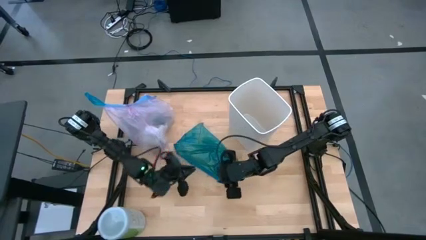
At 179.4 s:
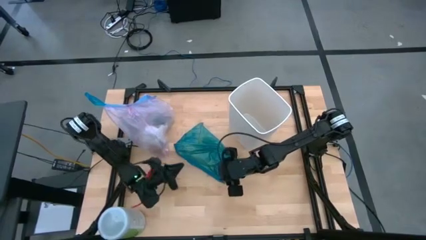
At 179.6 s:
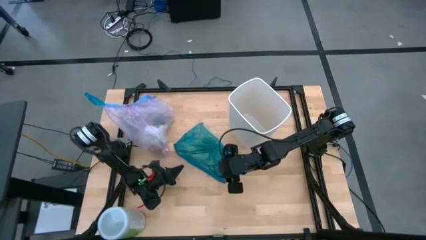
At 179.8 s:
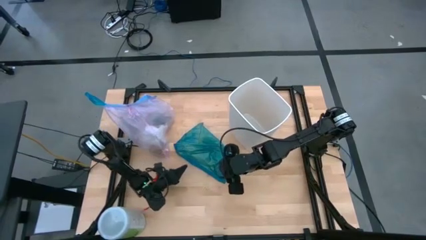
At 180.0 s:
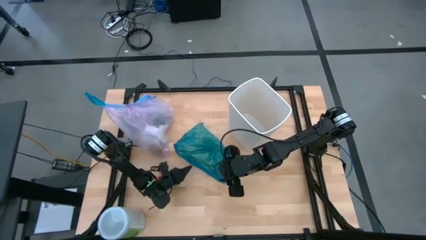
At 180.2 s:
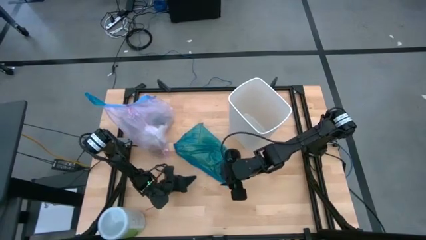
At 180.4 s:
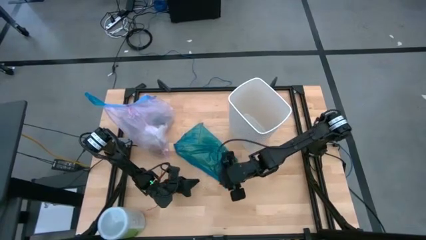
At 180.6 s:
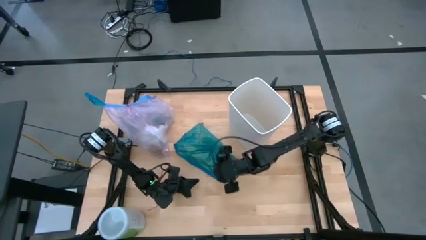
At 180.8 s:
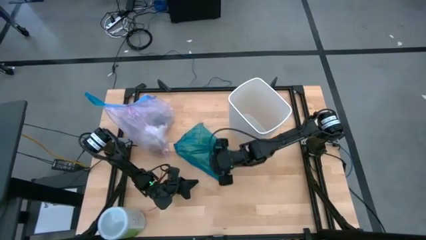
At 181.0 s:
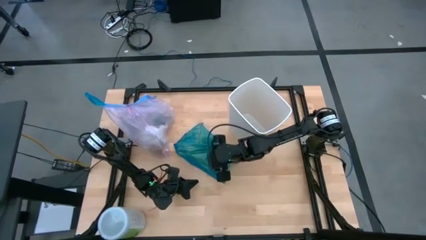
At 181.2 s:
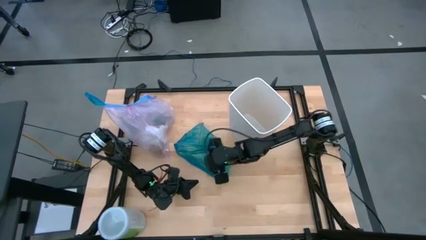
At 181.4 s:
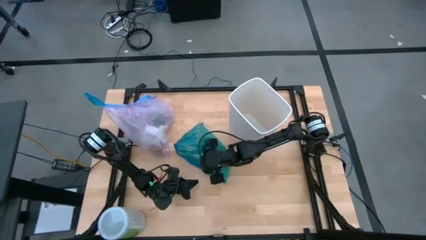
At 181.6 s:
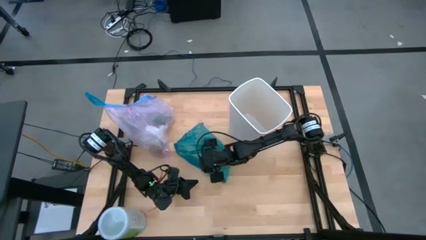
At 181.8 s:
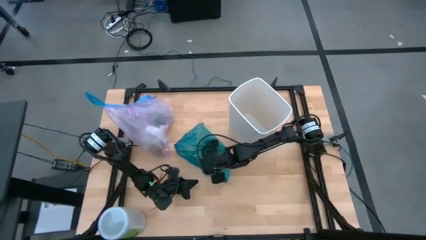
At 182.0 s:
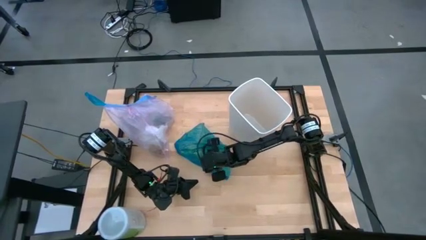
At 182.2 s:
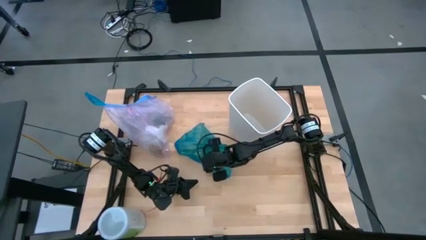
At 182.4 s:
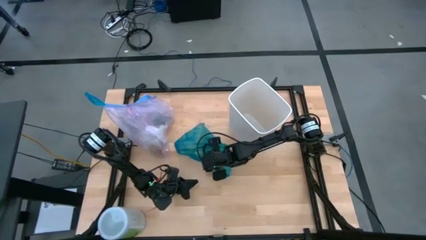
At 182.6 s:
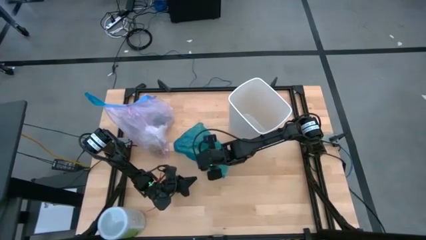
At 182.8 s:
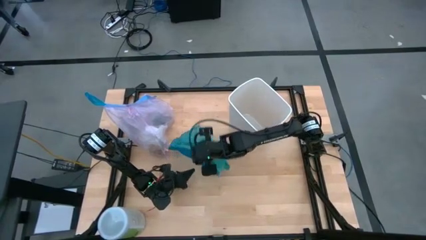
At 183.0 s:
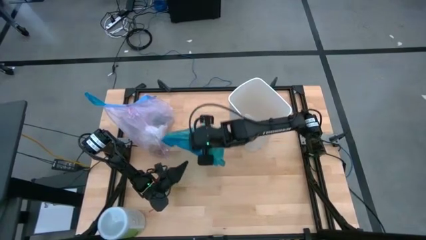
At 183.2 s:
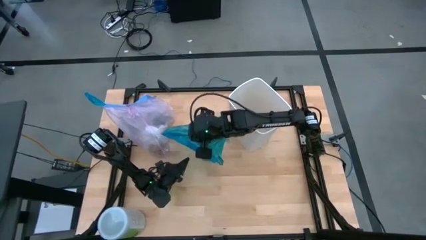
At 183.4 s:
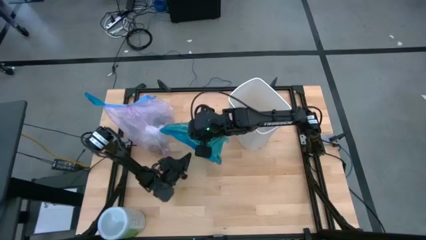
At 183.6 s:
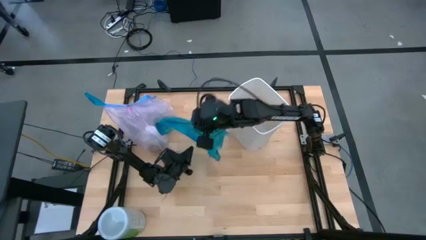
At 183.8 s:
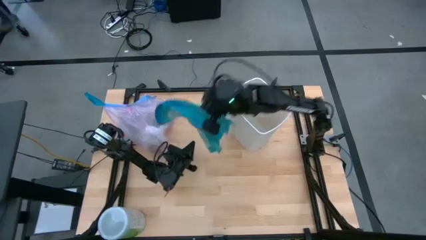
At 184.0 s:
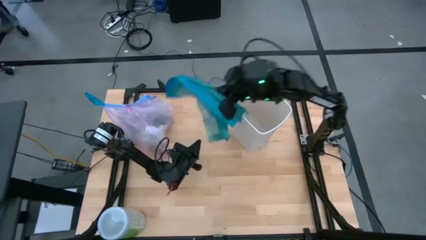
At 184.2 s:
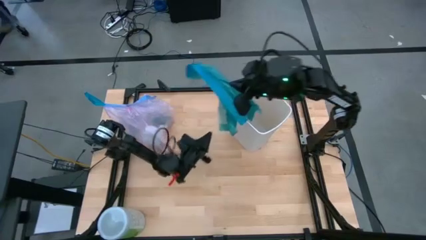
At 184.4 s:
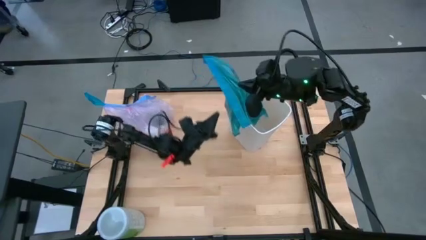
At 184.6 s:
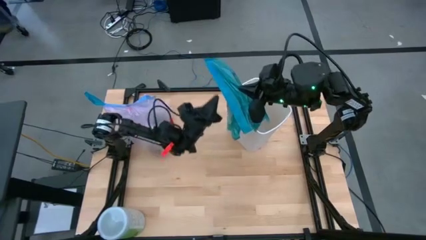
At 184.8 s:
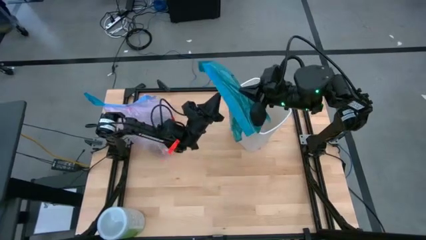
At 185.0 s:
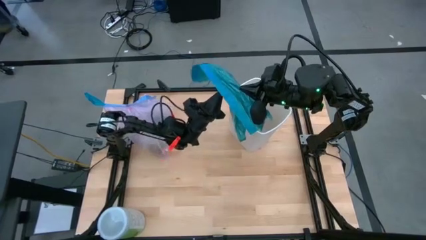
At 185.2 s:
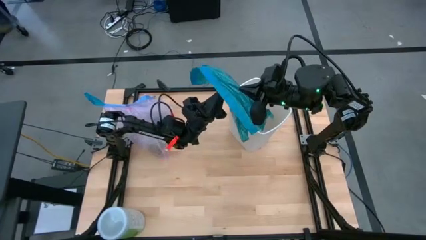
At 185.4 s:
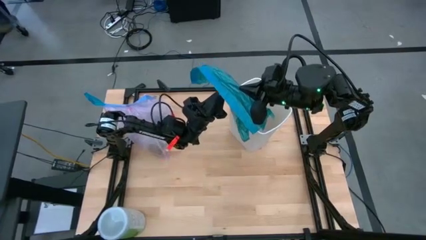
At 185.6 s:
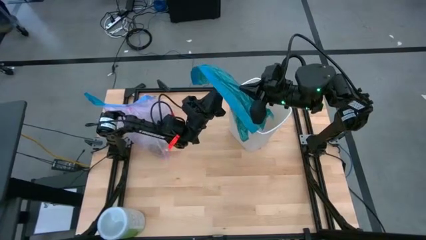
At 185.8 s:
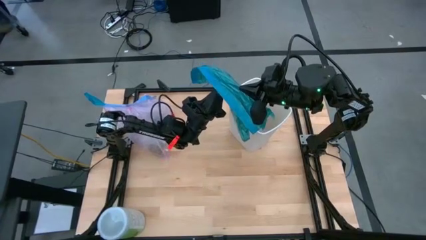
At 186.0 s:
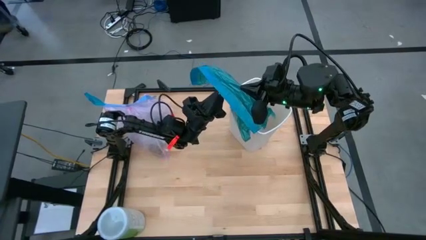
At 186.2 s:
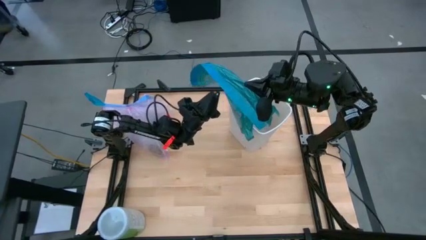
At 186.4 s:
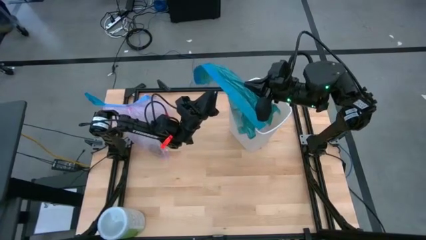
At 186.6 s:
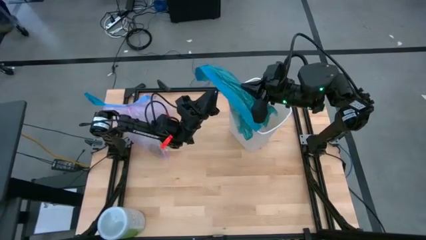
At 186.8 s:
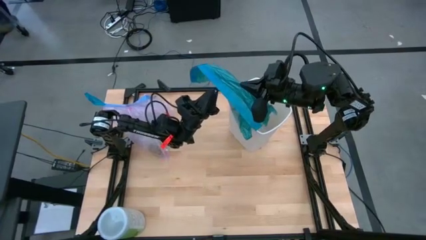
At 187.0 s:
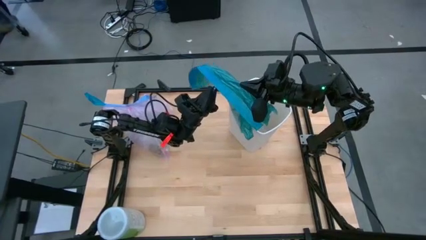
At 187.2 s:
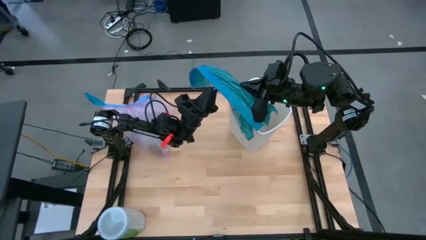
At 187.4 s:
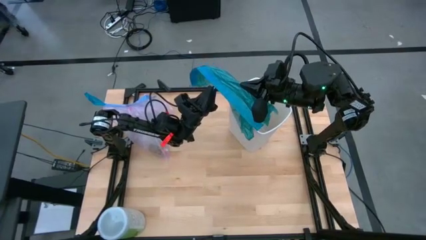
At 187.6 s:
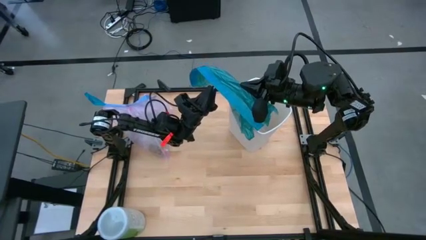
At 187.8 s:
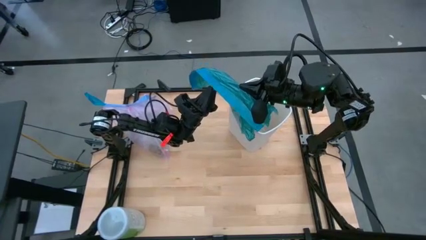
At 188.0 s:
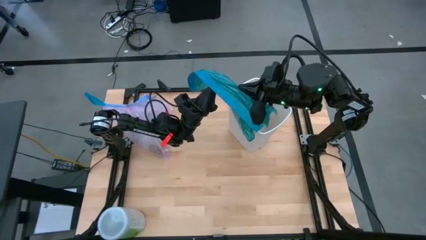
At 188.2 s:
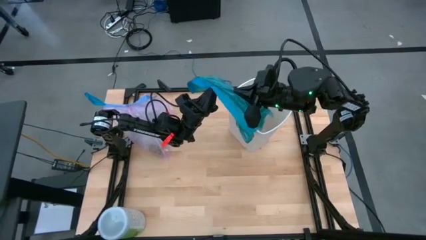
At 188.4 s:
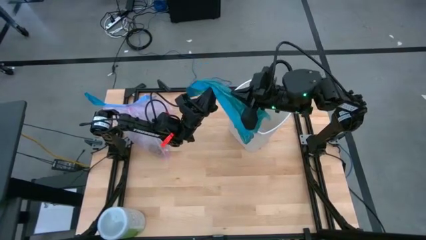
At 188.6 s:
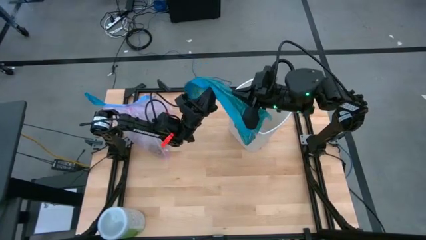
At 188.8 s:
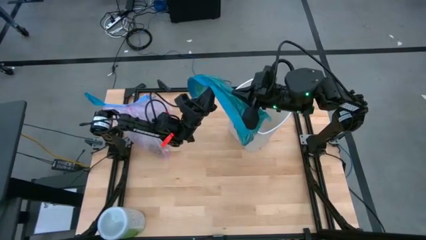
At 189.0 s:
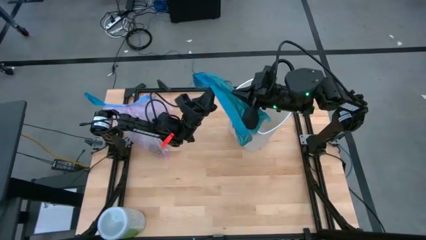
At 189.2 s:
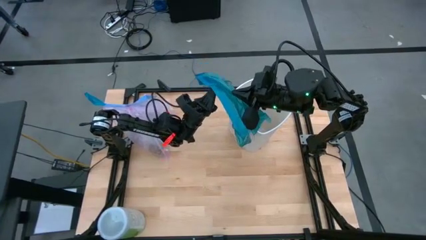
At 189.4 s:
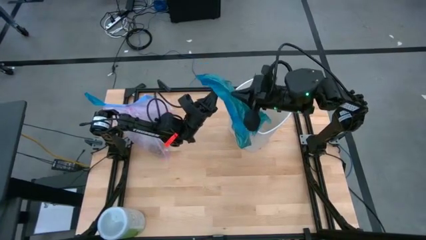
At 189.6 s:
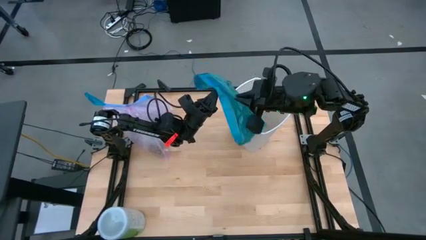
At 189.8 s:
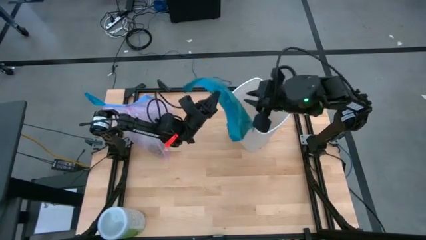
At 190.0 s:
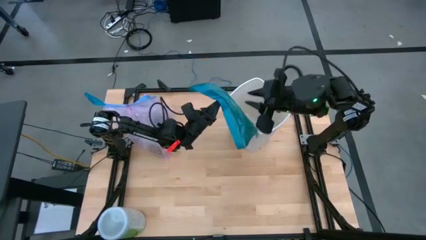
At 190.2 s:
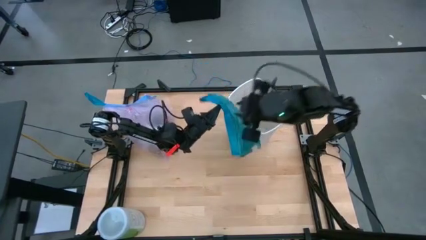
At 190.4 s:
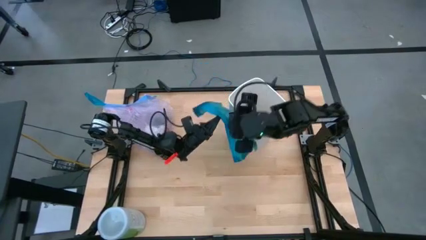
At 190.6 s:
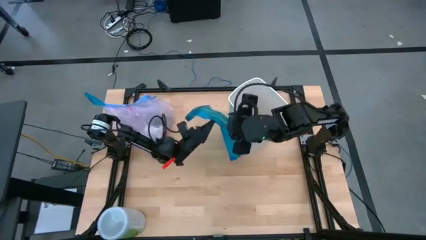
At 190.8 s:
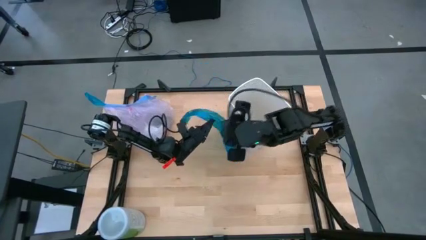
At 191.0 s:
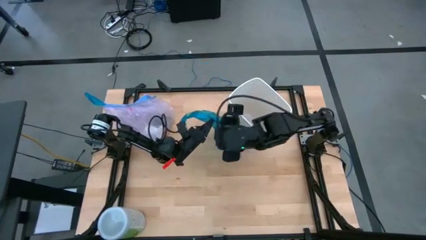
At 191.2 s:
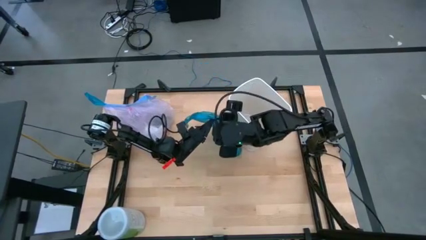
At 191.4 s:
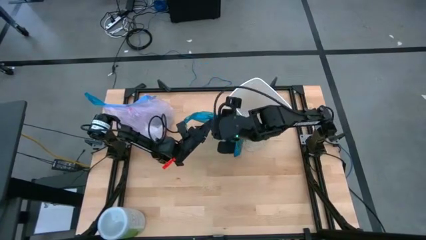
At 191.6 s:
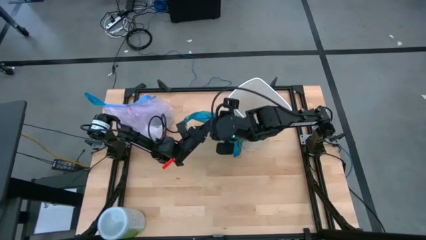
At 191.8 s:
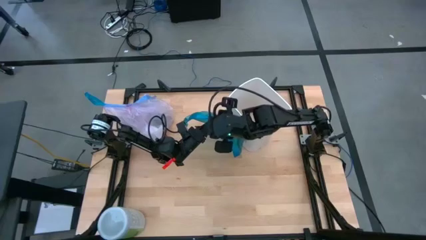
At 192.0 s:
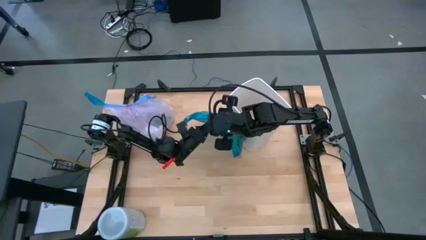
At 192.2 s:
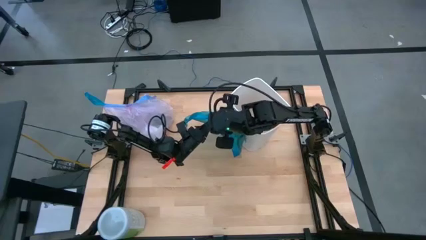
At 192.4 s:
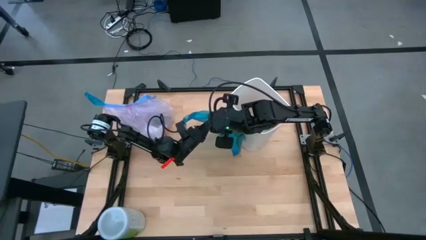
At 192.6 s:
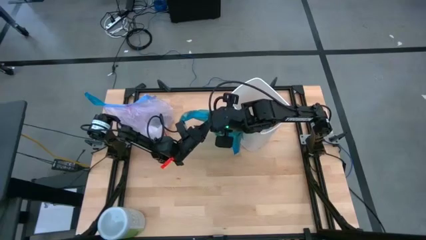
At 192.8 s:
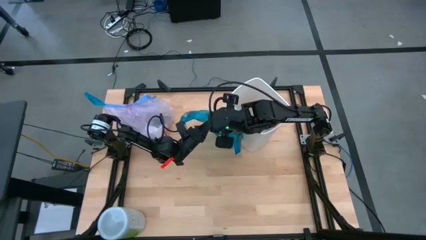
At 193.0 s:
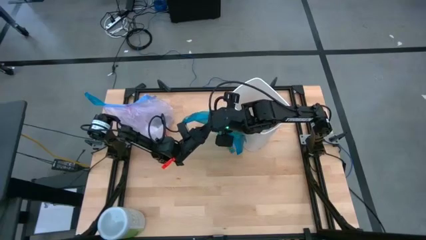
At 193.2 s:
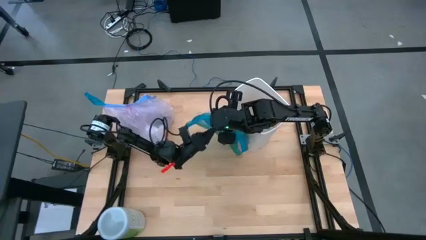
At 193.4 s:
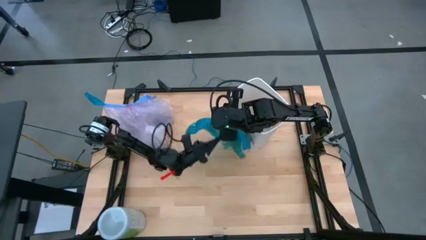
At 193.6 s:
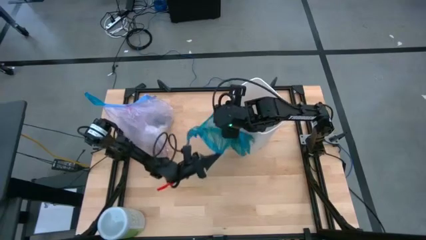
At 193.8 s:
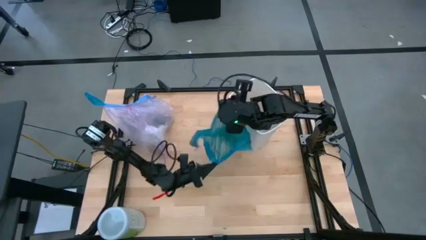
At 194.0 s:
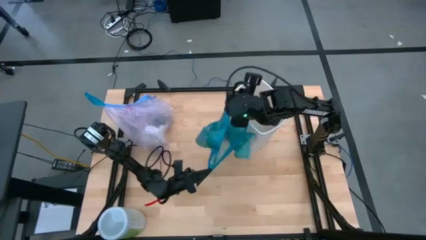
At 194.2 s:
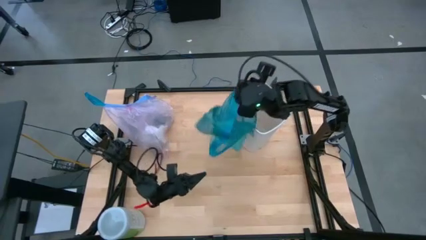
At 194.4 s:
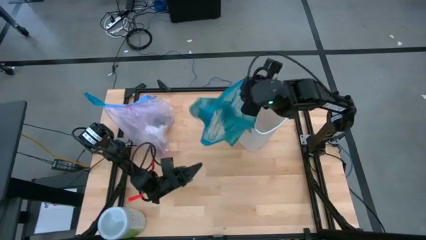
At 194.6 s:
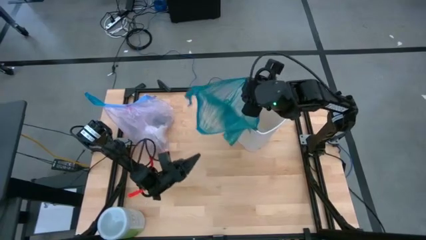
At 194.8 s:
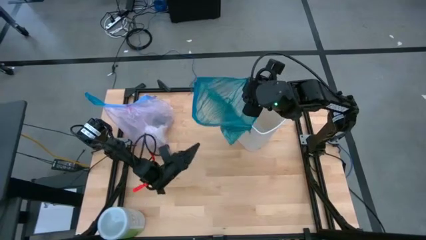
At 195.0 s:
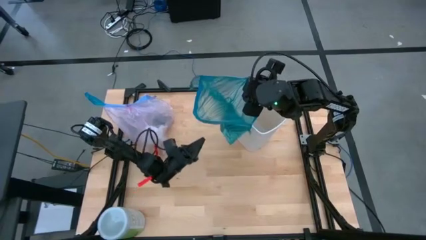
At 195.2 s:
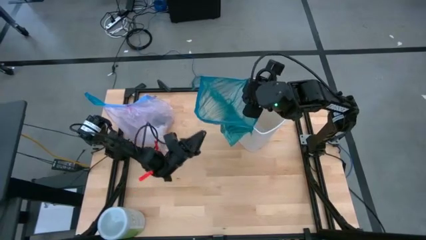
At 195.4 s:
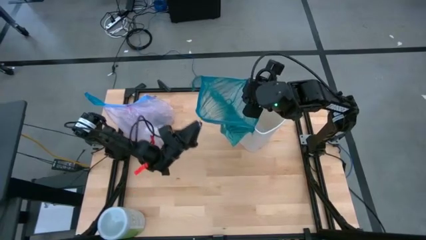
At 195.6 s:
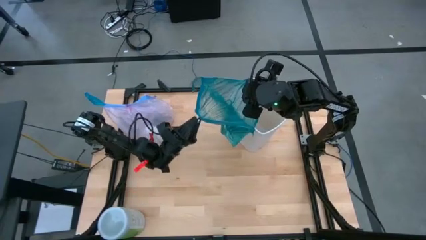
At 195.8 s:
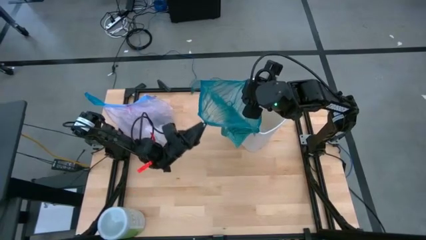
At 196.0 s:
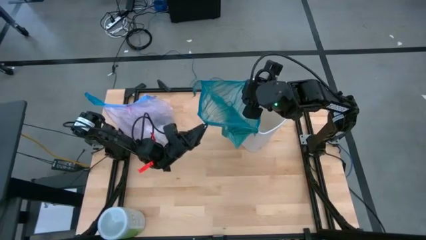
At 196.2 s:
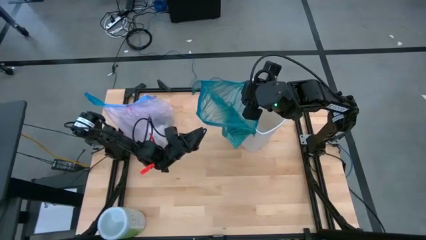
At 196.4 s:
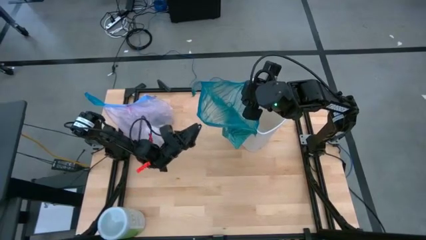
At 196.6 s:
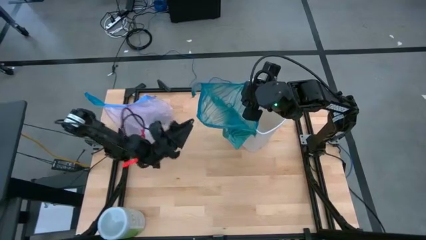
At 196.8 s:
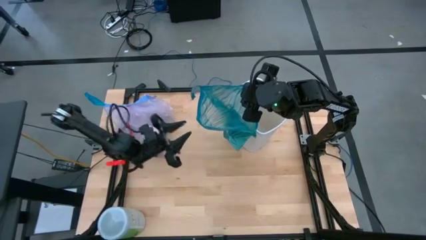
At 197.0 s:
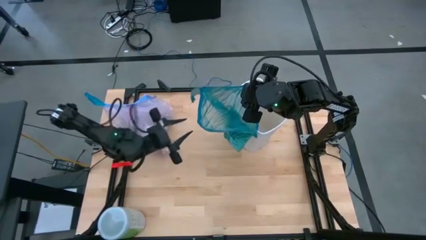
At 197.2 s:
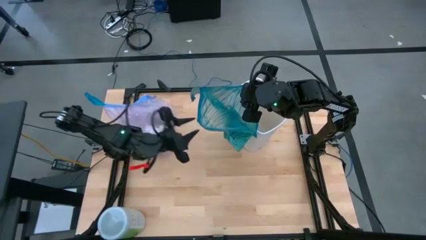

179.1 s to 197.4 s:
Task: place trash/remove bag and relplace
Put the blue trash bag into the white trash bin
